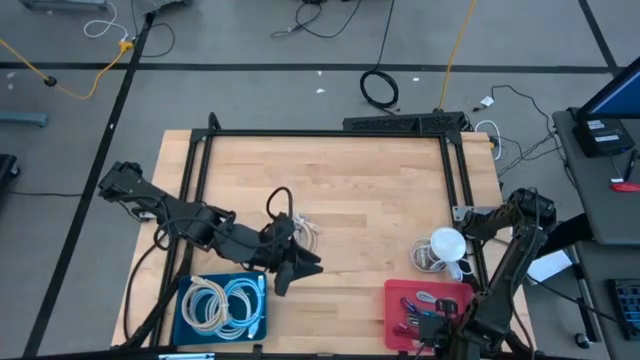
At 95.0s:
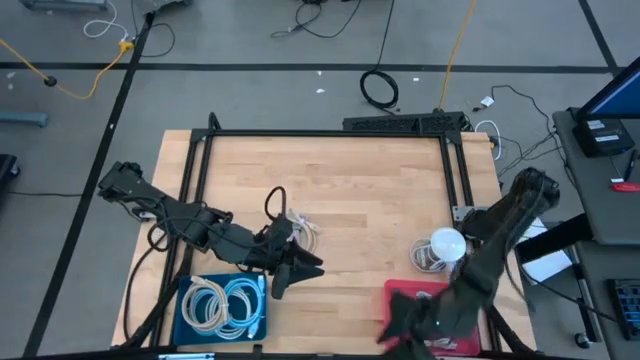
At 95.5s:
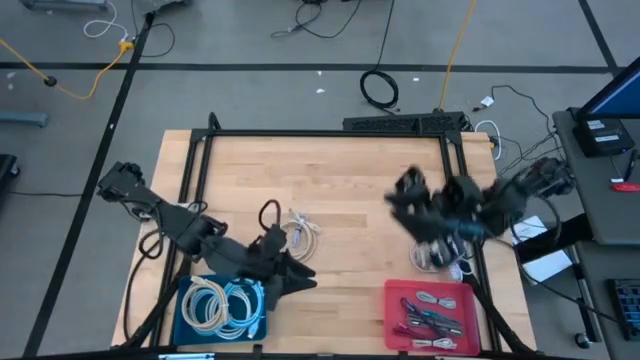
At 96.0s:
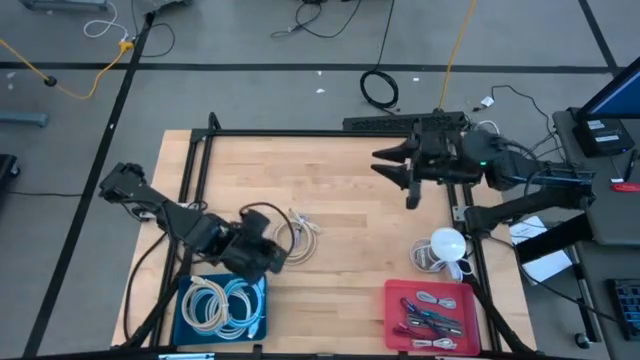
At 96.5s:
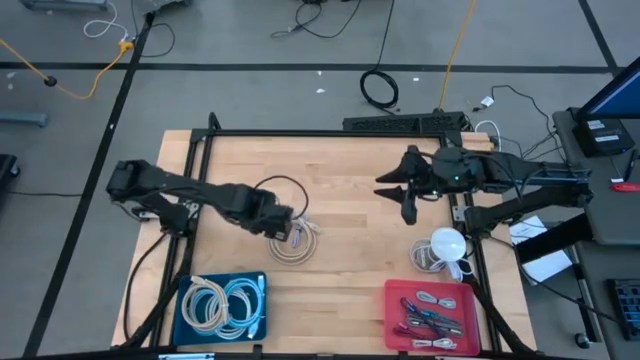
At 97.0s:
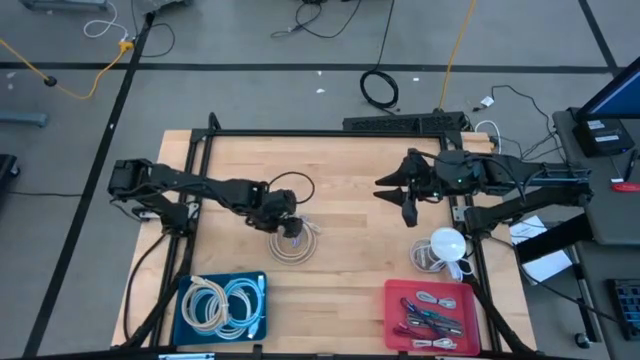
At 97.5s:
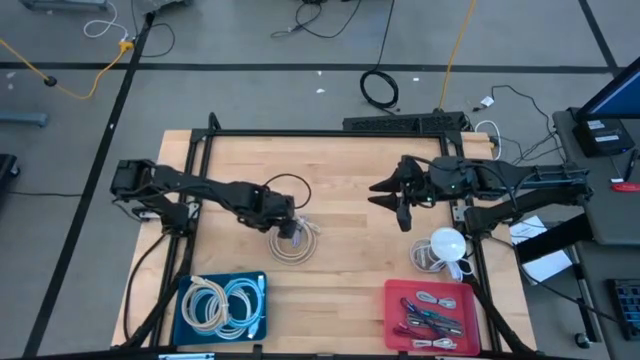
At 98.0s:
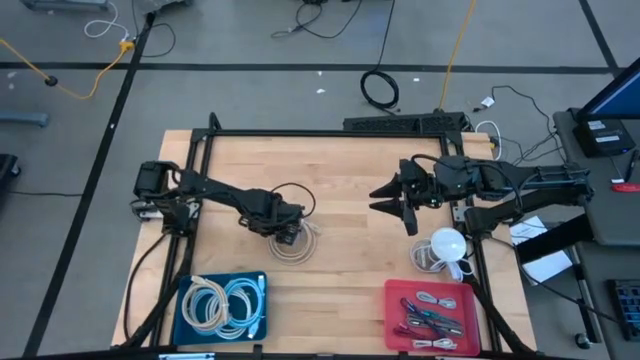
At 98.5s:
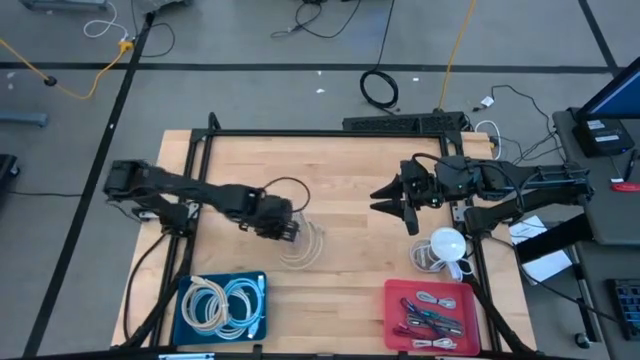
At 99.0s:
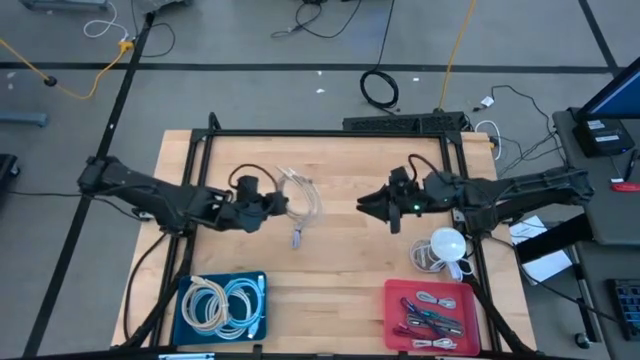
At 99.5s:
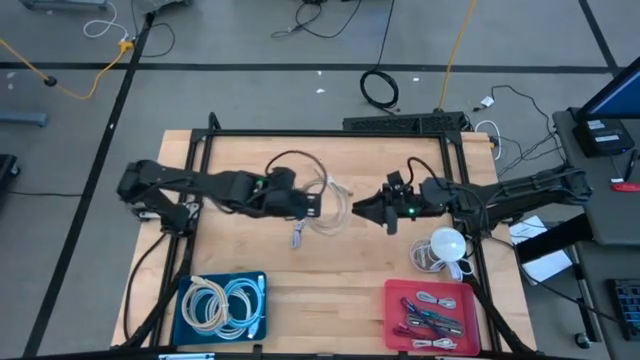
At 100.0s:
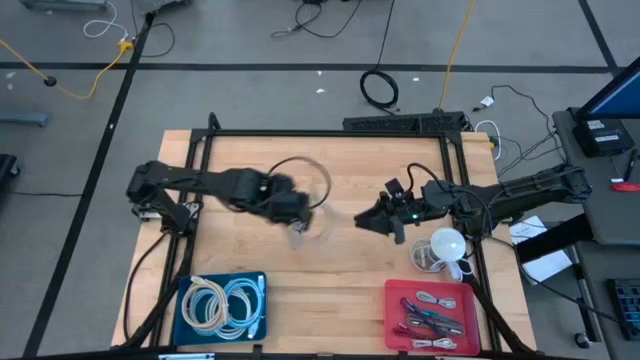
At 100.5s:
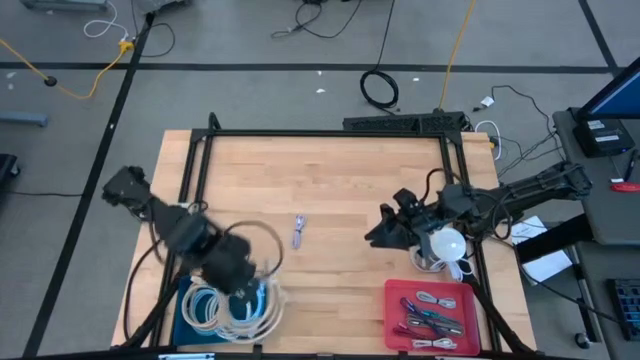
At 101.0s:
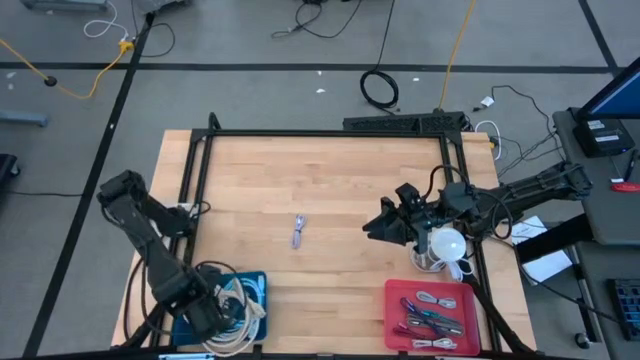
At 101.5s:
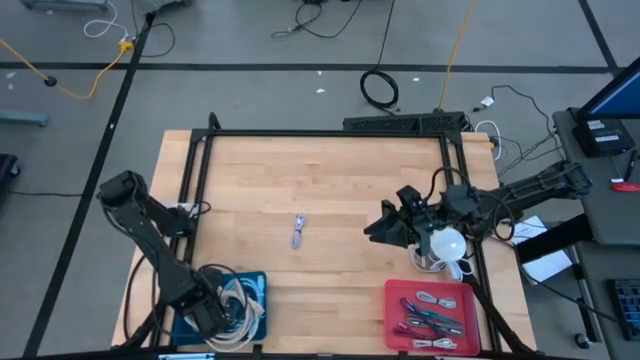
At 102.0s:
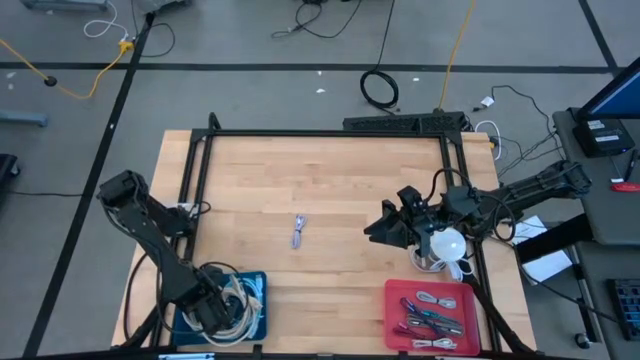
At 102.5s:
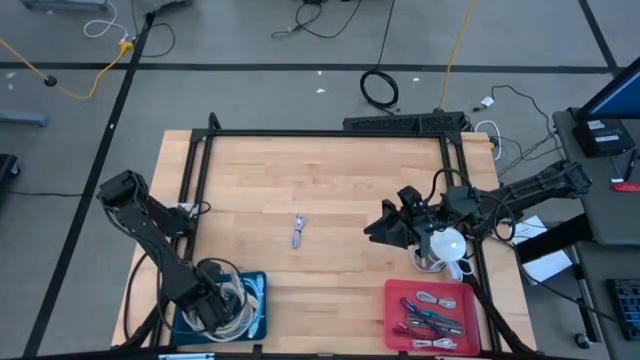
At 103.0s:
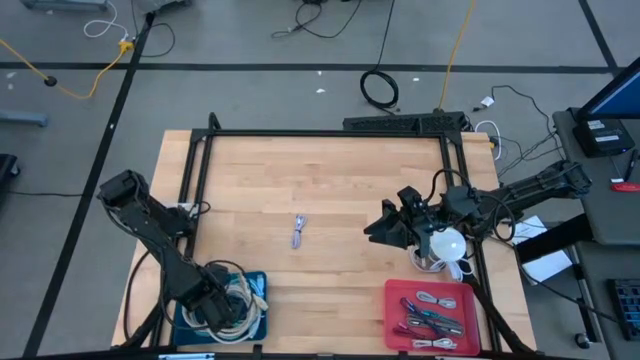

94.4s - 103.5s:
Task: Pick & Place USB Port
Put the light brown HDMI cable into the blue bin

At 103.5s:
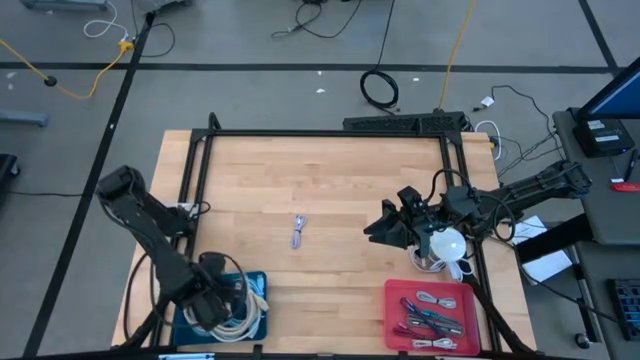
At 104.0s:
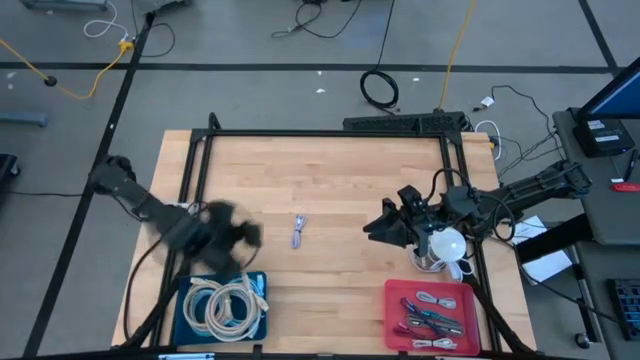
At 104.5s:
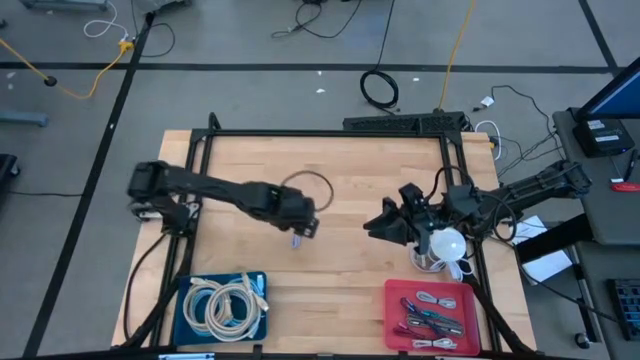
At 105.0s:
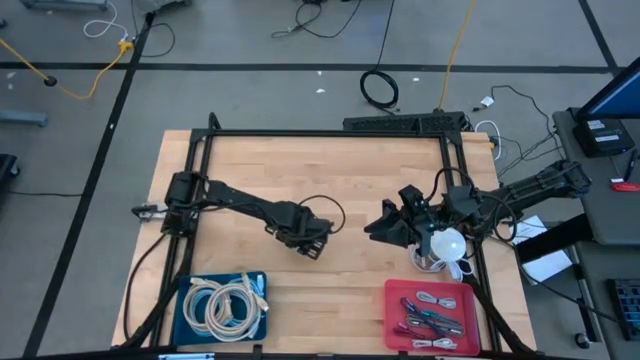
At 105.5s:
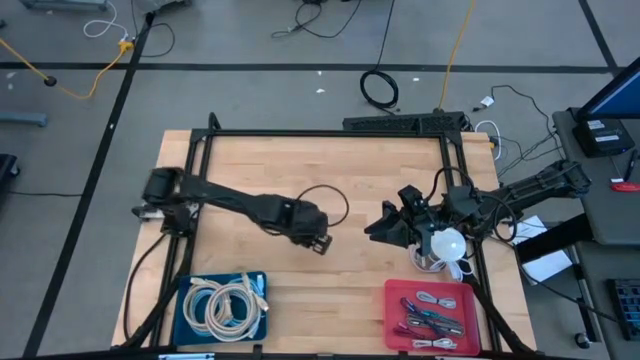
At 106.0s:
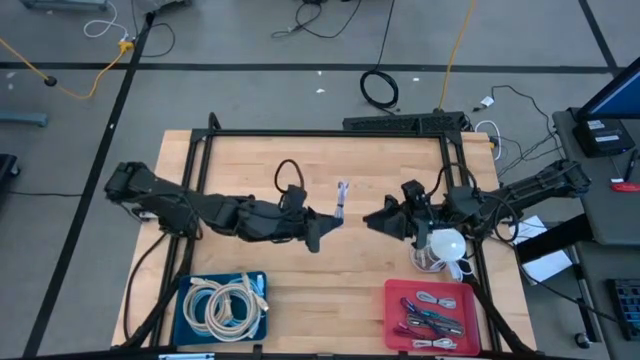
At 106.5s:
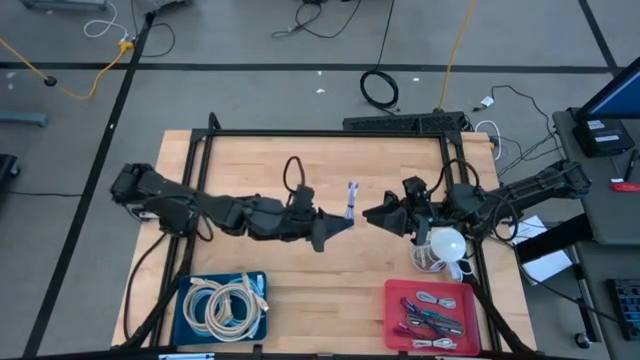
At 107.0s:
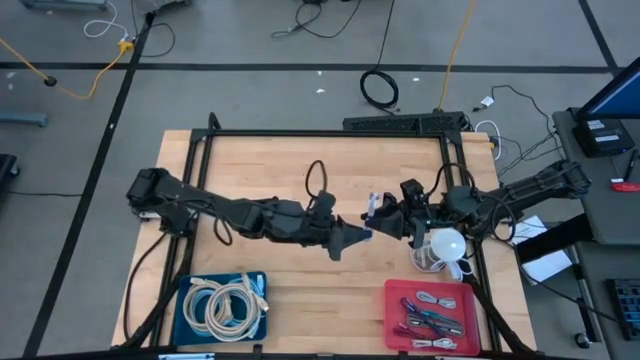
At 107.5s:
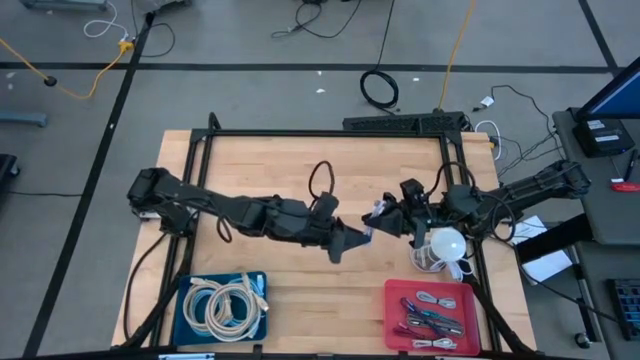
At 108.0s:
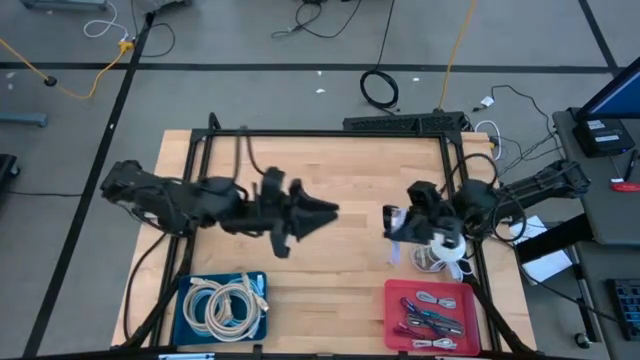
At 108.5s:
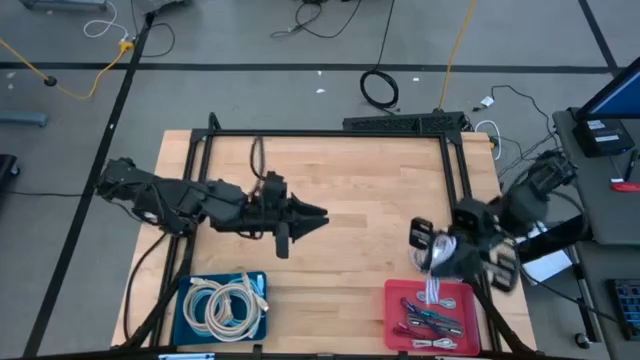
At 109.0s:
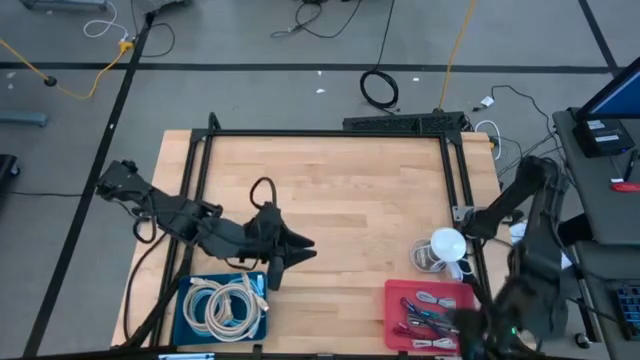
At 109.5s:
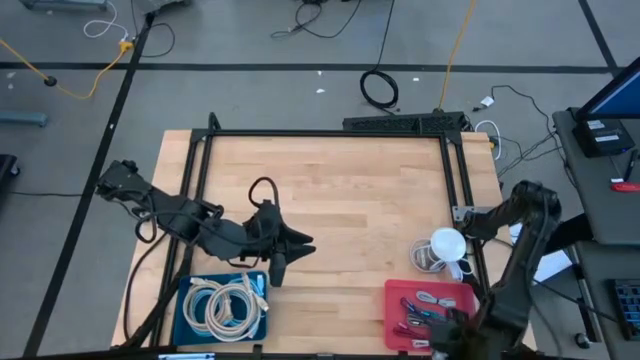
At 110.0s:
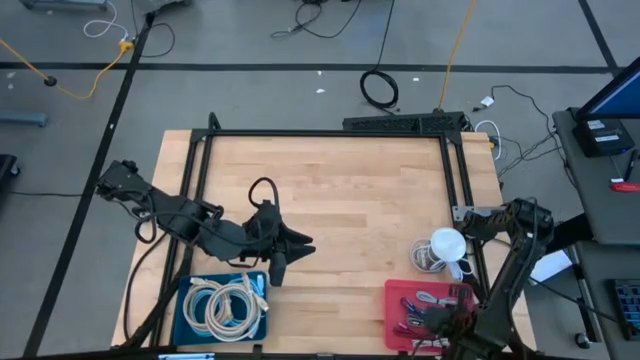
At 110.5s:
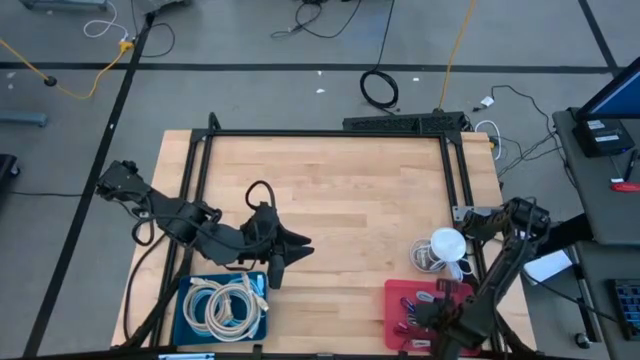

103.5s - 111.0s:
Put the pink charger cable into the pink bin

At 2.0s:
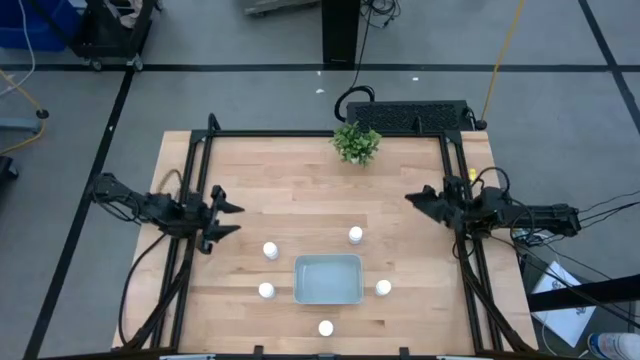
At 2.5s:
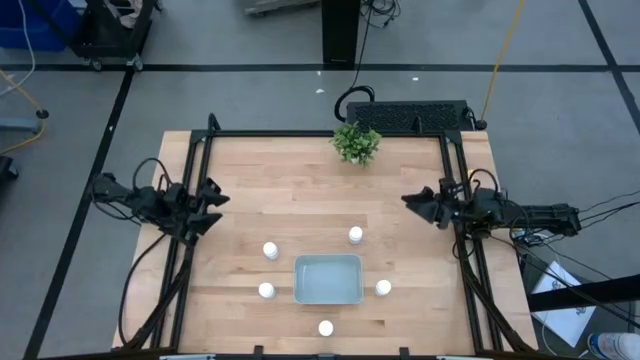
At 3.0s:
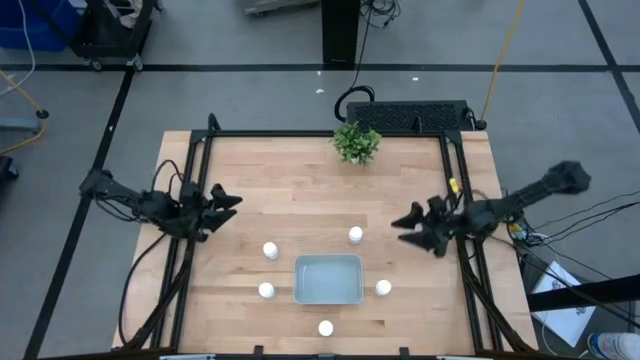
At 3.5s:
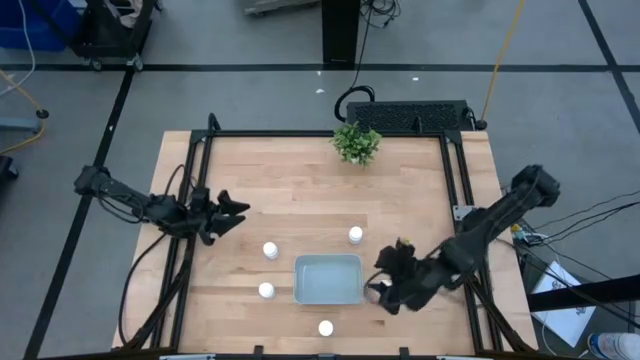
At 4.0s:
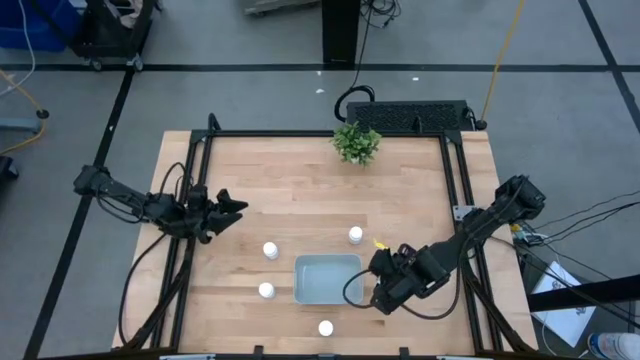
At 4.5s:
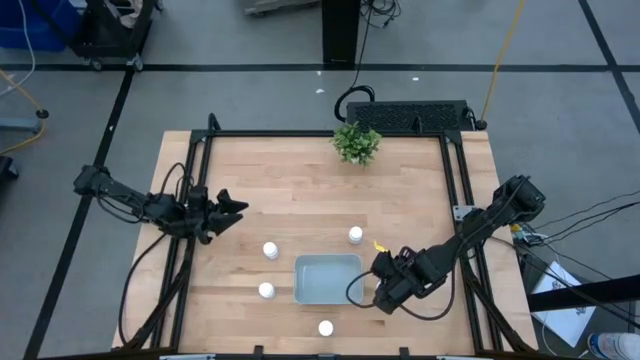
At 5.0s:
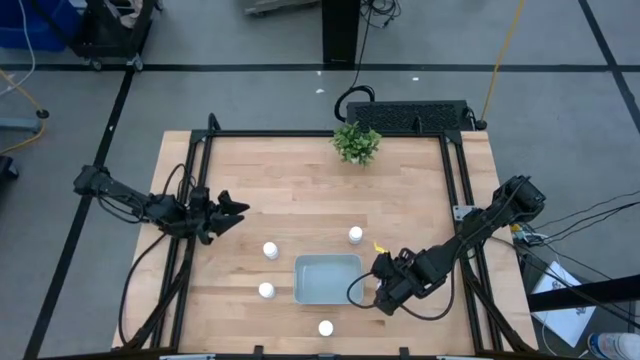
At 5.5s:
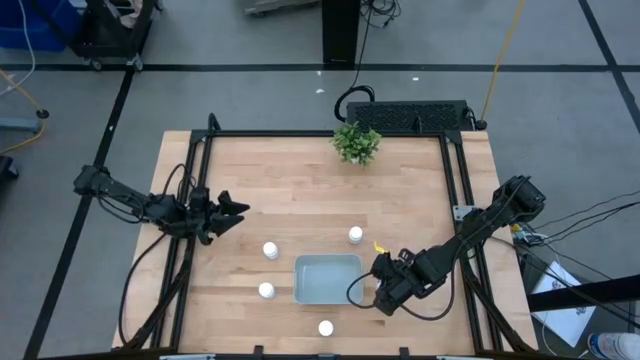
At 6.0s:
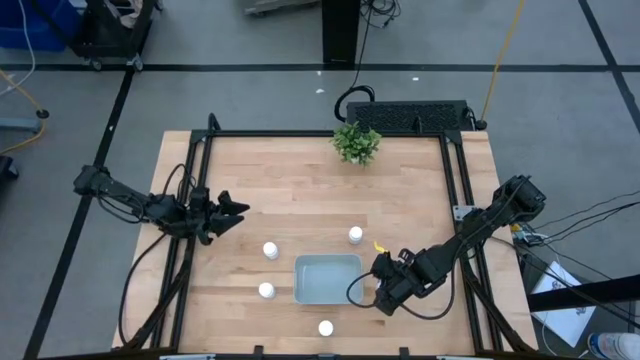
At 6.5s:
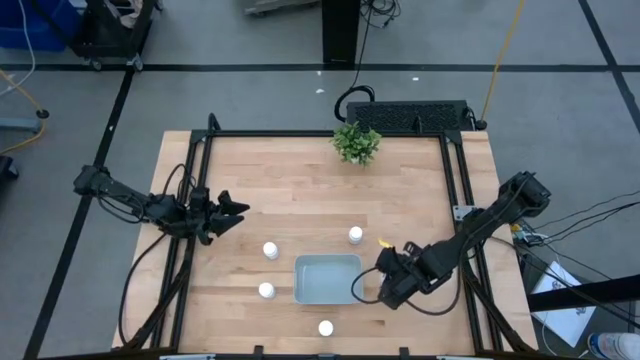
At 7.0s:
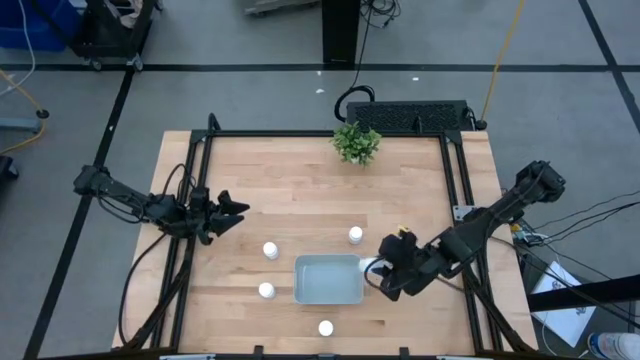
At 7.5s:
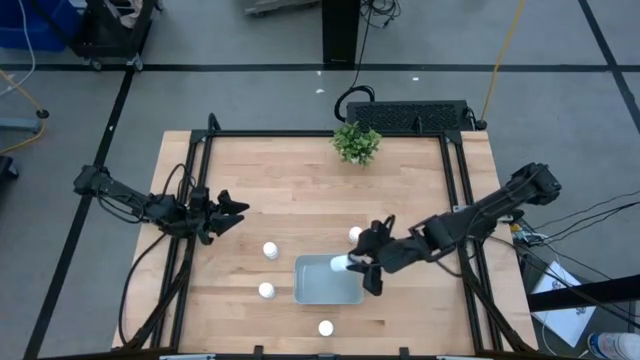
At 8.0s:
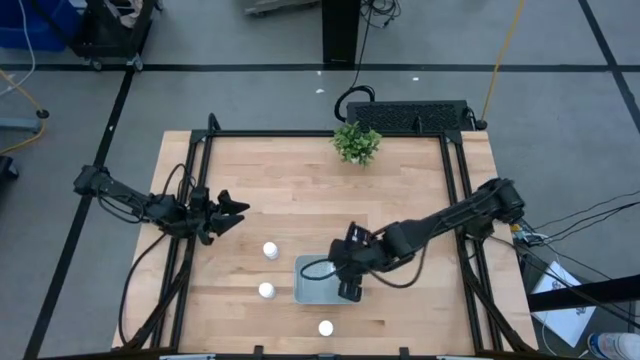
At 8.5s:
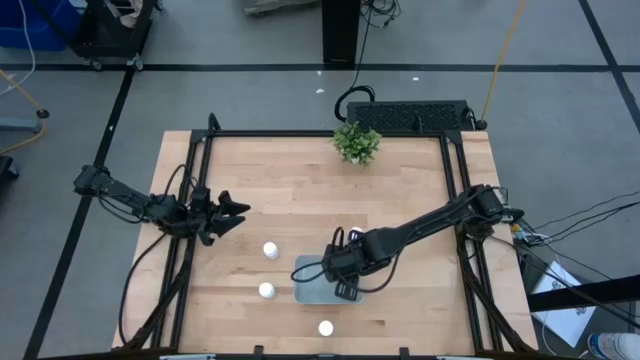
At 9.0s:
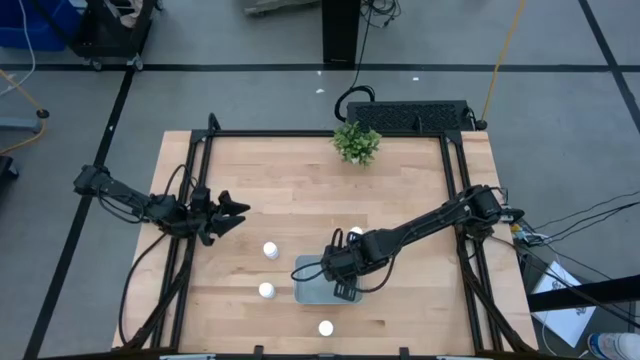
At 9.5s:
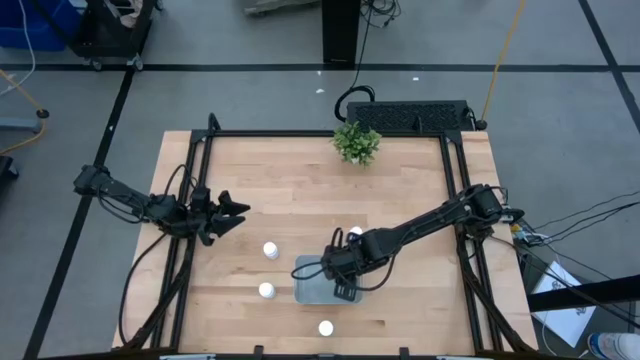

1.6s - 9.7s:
Task: Pick and place pill bottles into a basket
Put the white pill bottle into the gray bin
